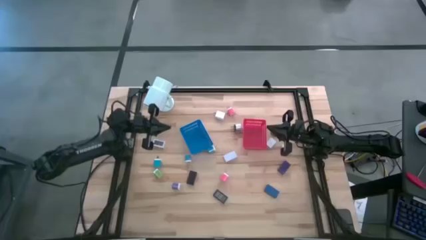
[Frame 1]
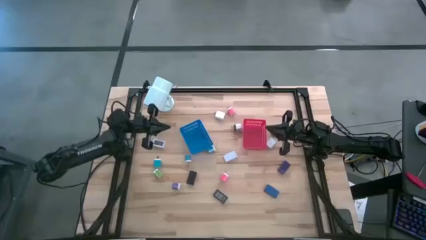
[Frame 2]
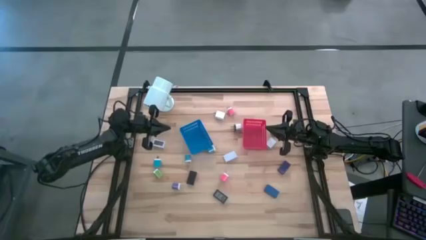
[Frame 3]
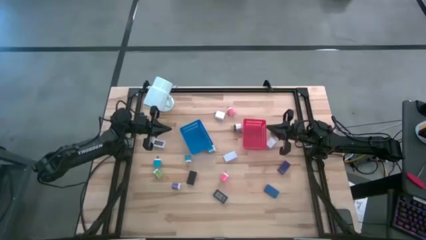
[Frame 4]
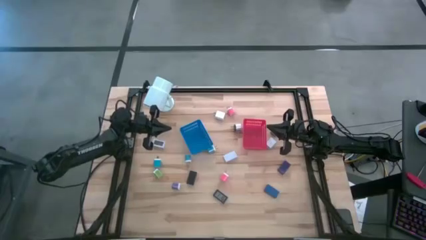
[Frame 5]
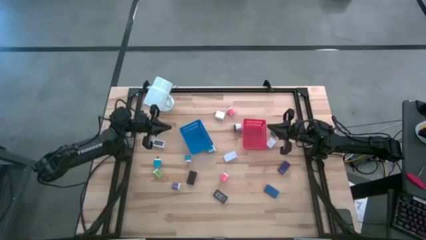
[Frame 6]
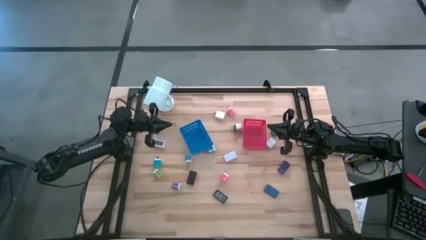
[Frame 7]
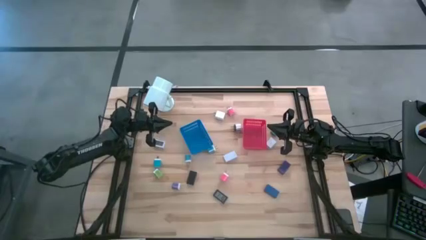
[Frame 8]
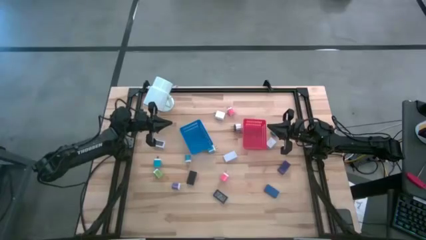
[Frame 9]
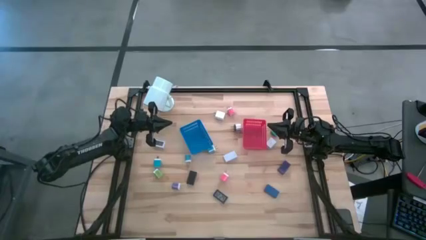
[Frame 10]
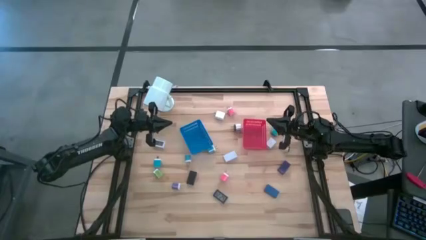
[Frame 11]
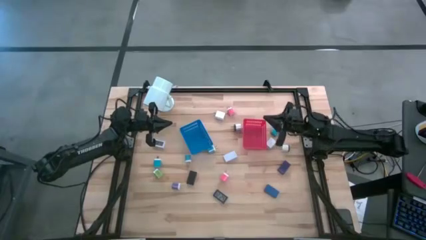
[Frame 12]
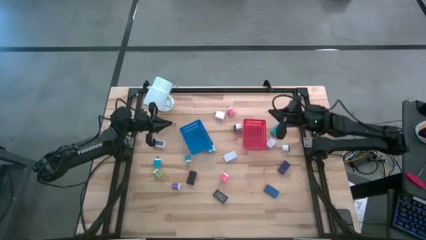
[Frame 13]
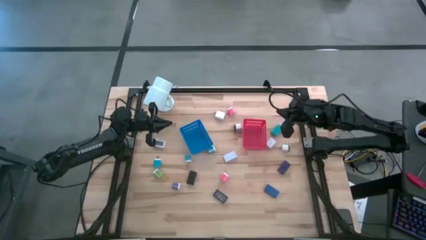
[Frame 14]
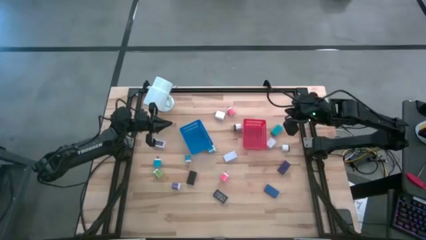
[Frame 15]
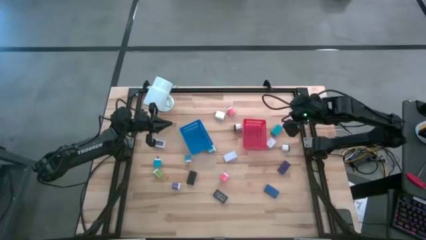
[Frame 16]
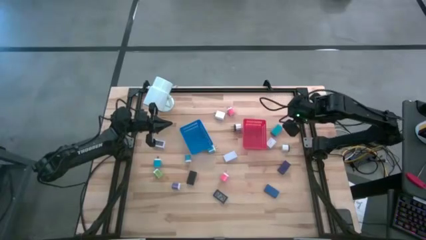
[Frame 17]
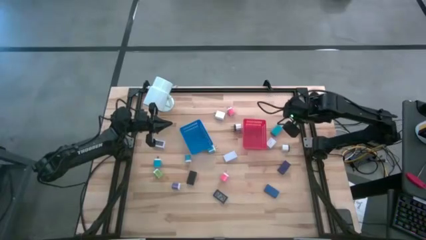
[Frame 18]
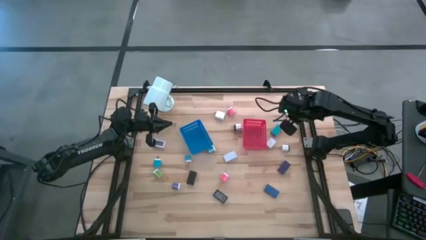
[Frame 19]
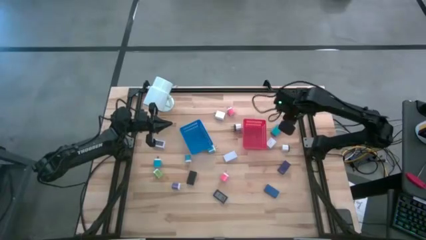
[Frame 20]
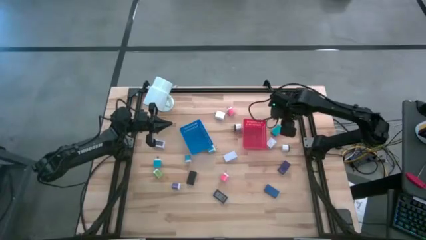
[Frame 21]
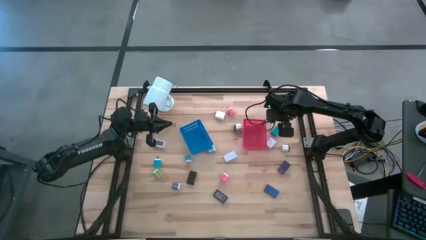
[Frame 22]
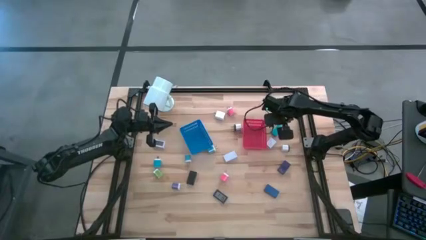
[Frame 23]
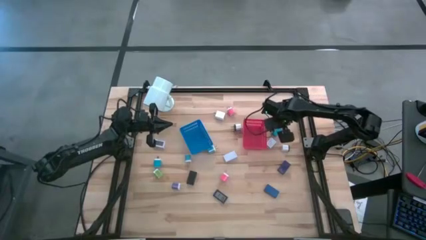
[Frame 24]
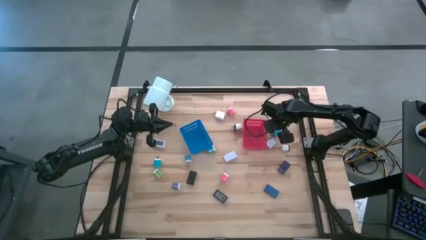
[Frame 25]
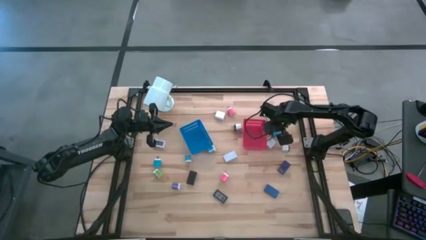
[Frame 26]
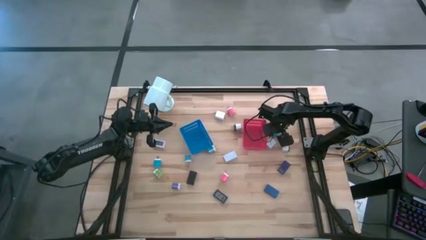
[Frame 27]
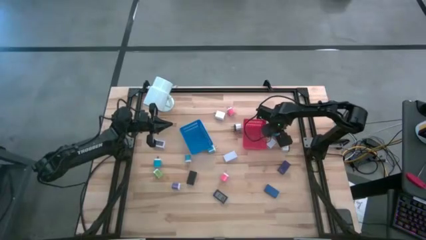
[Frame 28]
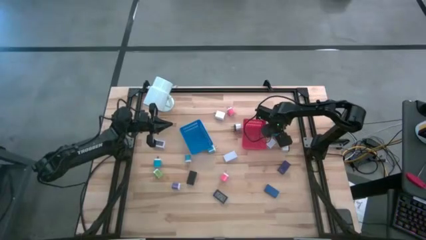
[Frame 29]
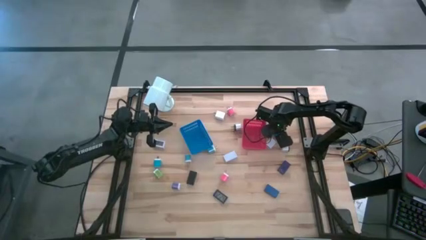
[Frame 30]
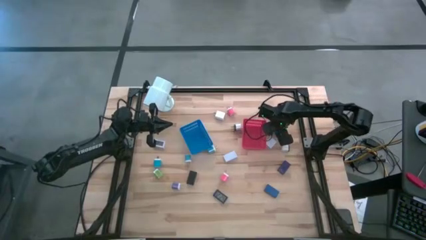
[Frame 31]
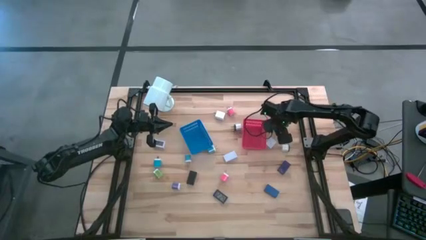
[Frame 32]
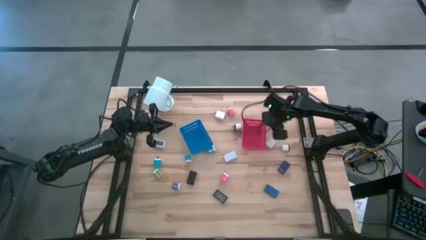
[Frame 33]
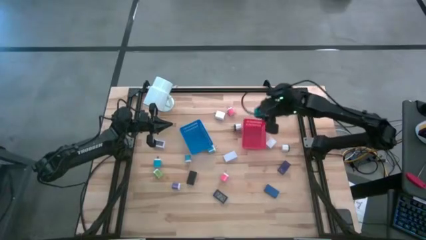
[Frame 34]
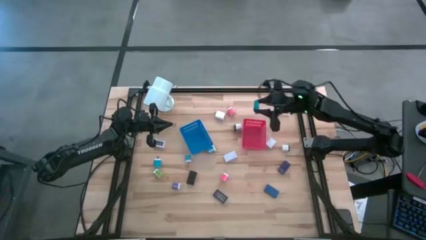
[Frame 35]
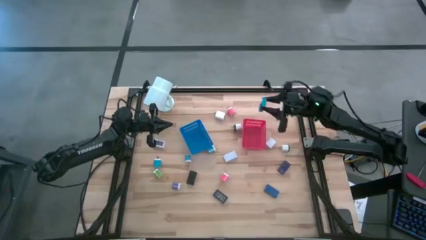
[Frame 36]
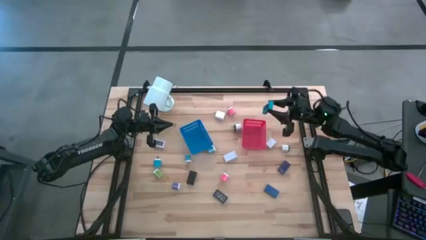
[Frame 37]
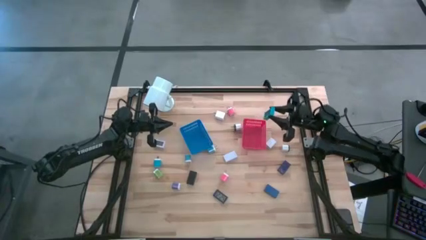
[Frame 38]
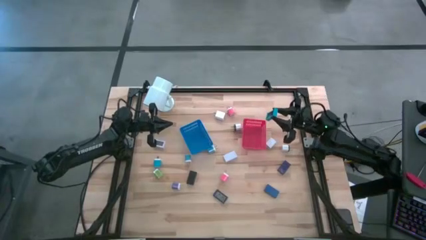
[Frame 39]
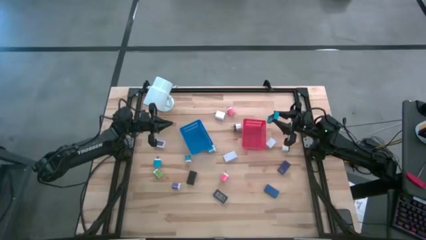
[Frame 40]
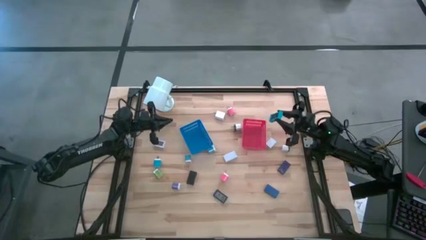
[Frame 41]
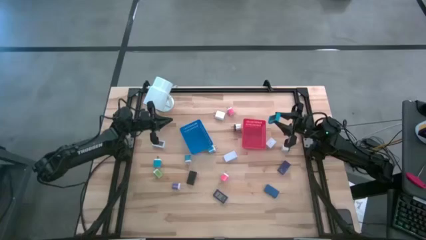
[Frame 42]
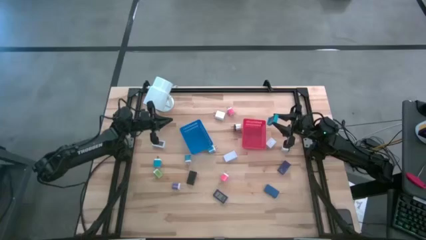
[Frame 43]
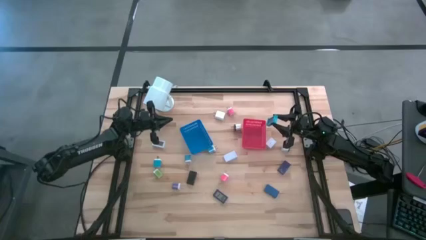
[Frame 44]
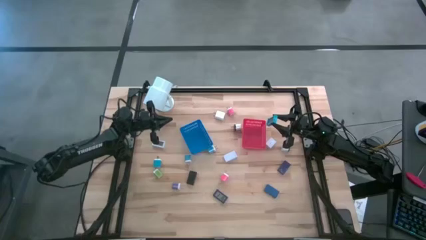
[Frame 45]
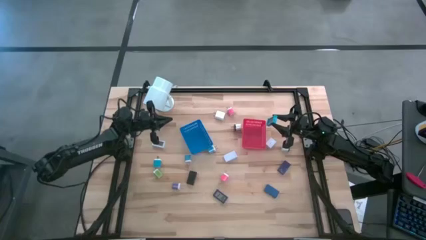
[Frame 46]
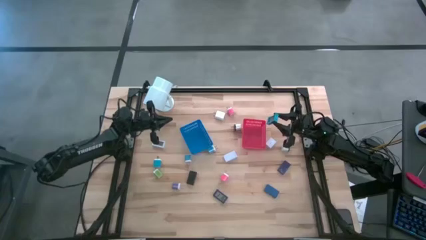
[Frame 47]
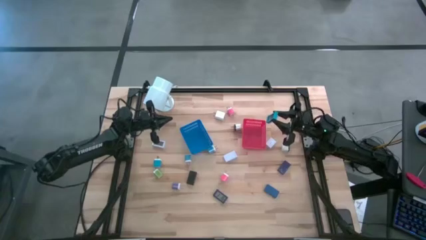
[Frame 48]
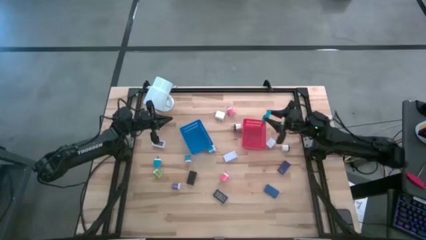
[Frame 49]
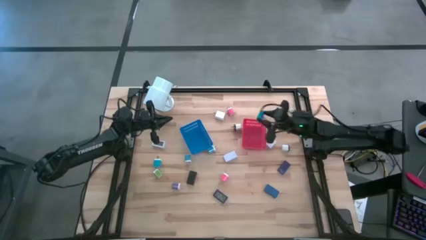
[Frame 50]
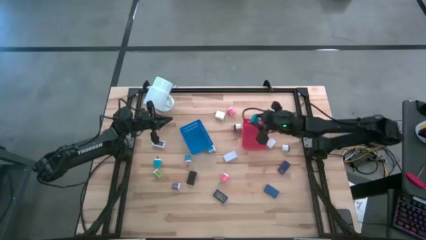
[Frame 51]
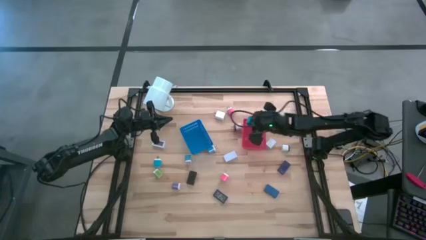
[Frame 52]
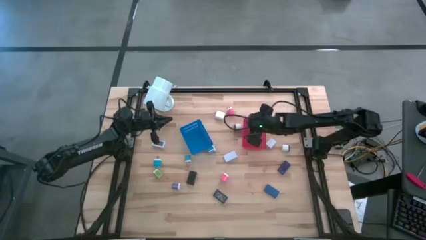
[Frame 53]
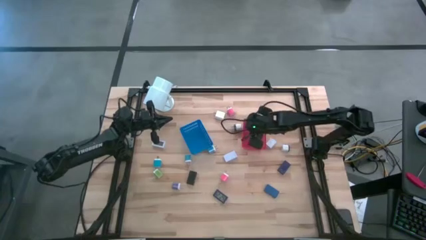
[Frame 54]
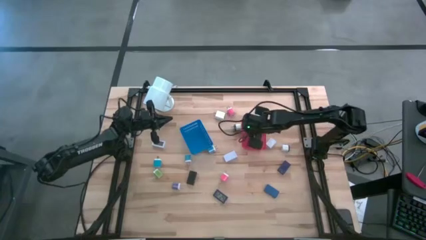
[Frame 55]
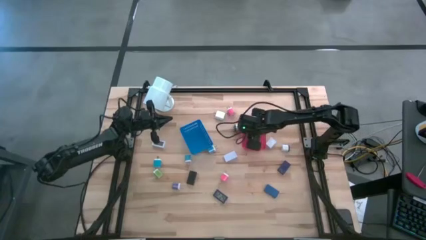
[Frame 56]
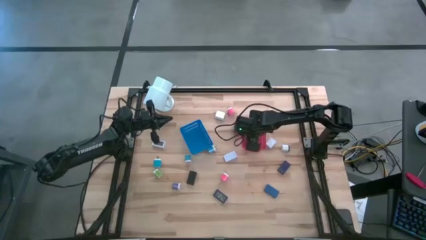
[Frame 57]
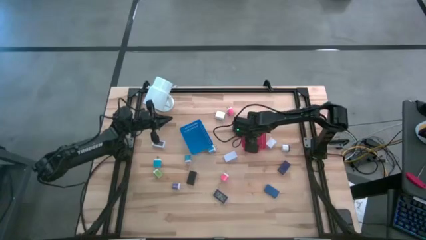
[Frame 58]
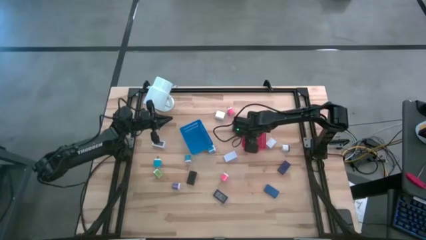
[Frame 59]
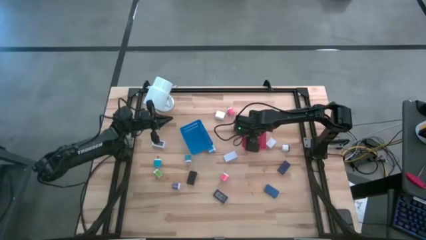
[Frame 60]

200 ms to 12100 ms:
Task: Pick & Place Office items
Put the light blue digital clock into the red bin
